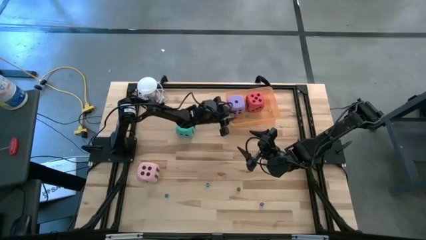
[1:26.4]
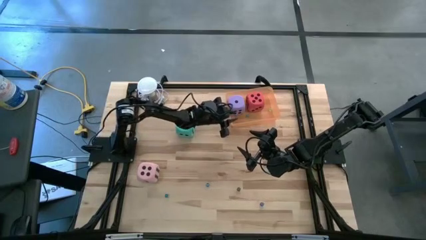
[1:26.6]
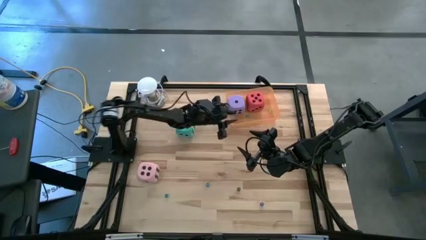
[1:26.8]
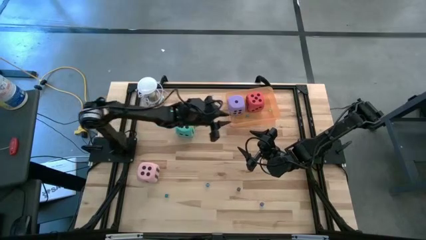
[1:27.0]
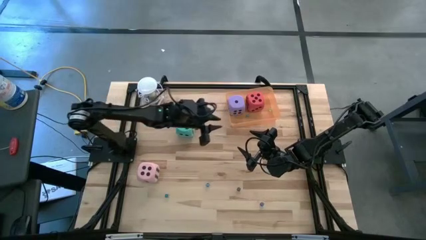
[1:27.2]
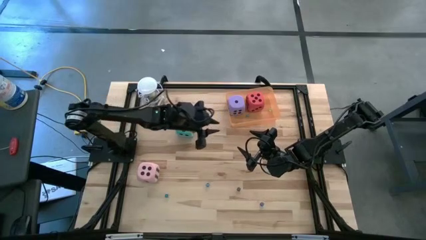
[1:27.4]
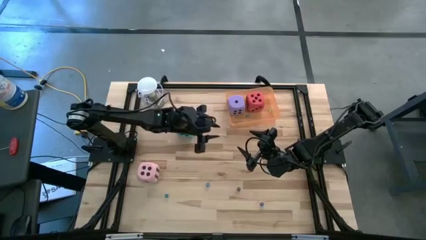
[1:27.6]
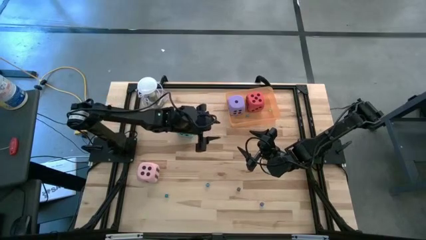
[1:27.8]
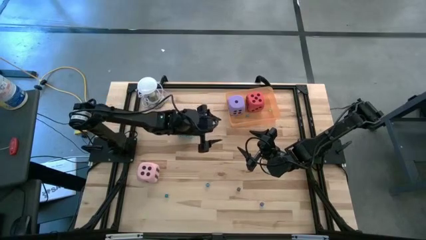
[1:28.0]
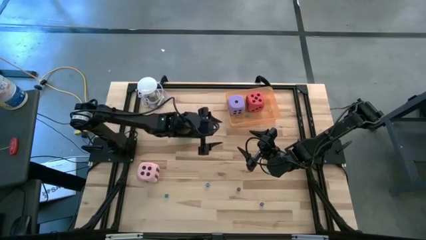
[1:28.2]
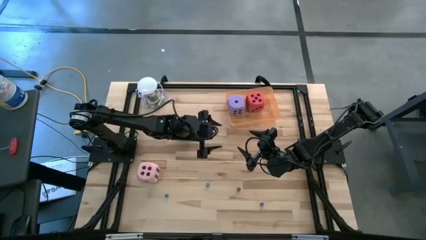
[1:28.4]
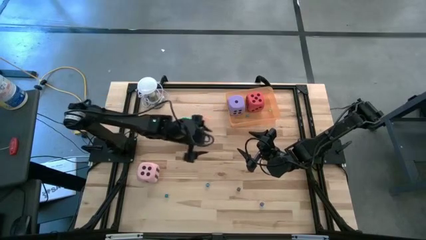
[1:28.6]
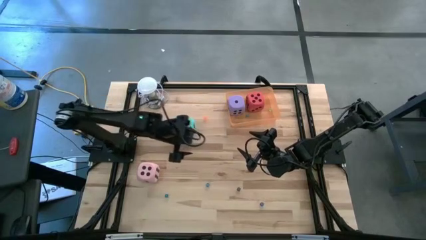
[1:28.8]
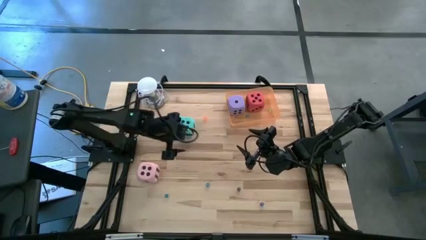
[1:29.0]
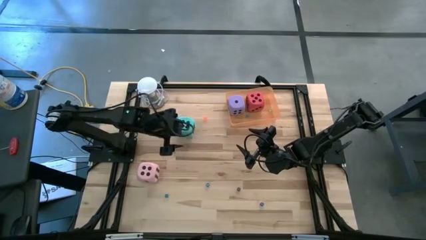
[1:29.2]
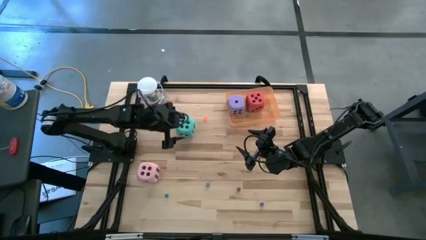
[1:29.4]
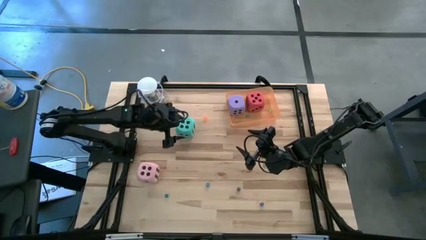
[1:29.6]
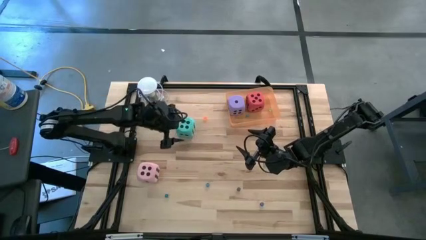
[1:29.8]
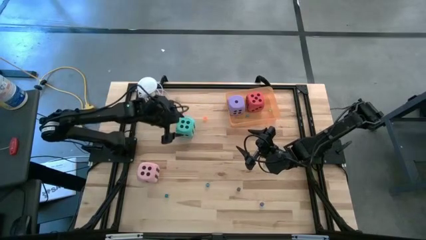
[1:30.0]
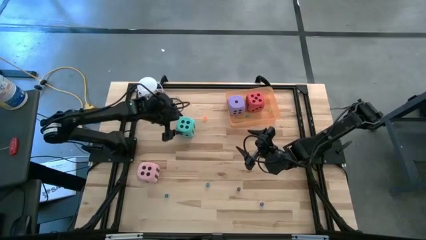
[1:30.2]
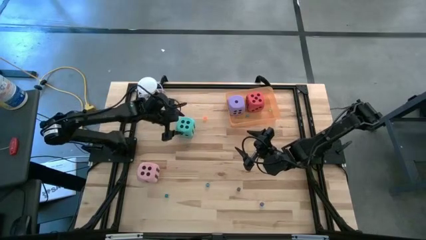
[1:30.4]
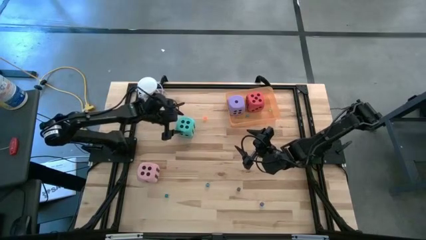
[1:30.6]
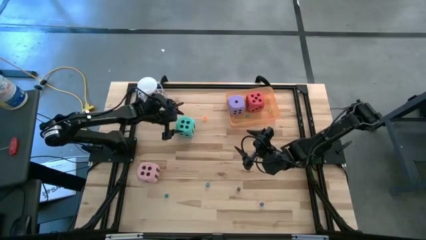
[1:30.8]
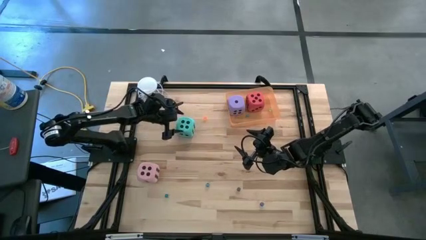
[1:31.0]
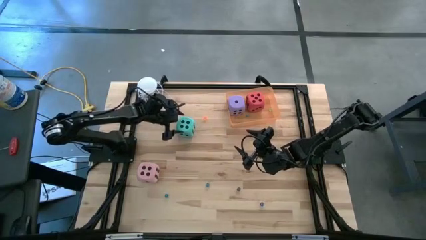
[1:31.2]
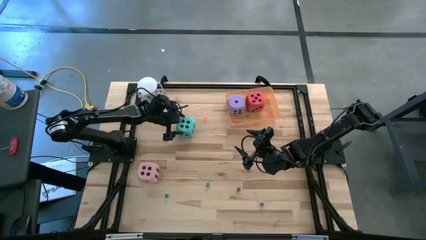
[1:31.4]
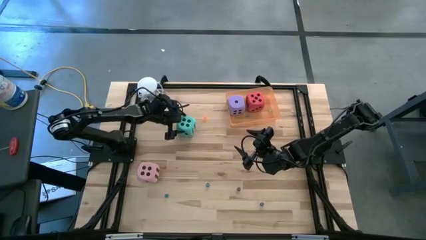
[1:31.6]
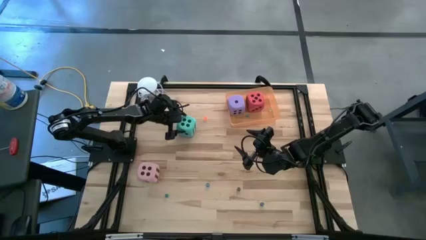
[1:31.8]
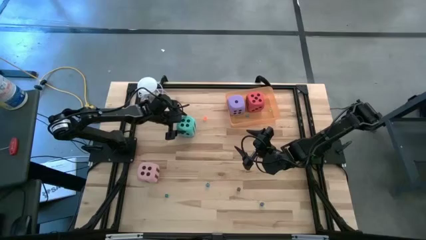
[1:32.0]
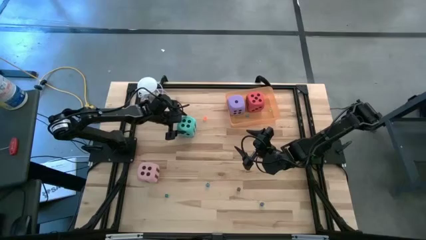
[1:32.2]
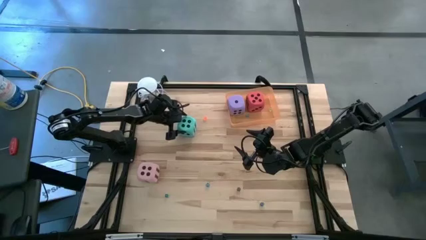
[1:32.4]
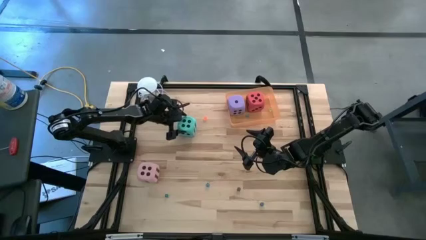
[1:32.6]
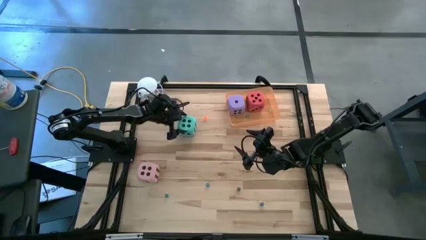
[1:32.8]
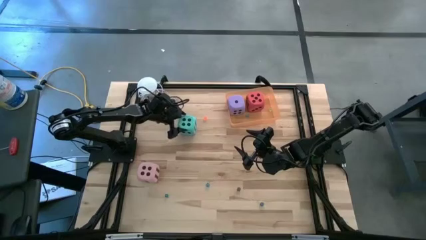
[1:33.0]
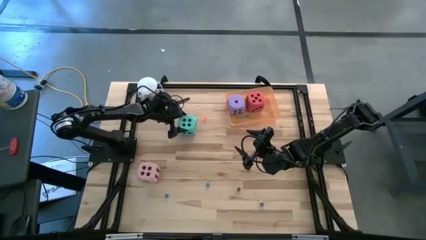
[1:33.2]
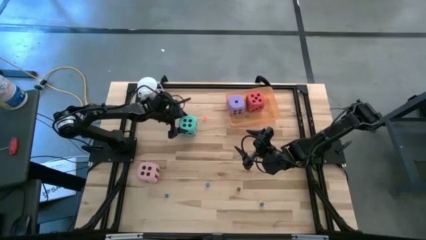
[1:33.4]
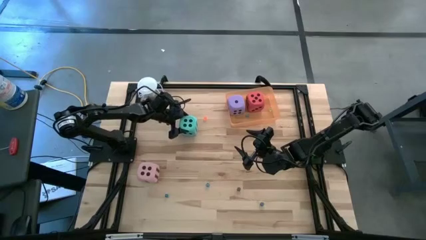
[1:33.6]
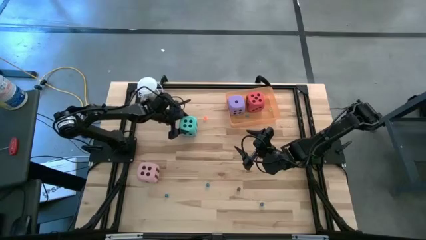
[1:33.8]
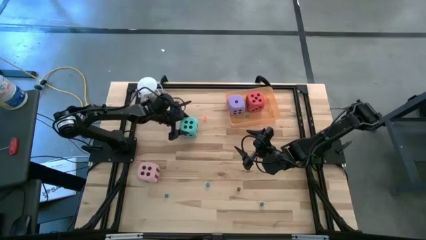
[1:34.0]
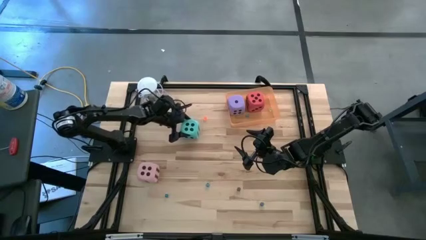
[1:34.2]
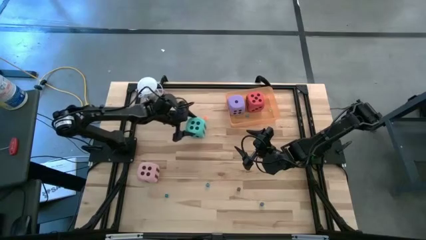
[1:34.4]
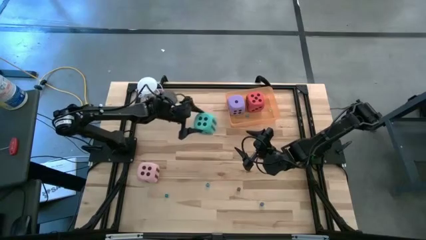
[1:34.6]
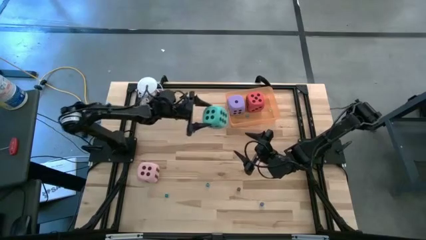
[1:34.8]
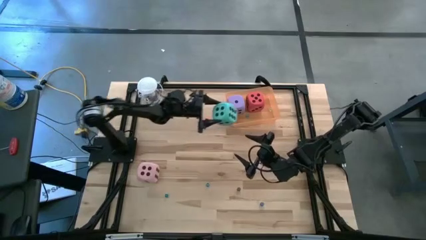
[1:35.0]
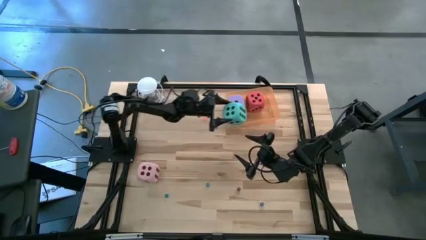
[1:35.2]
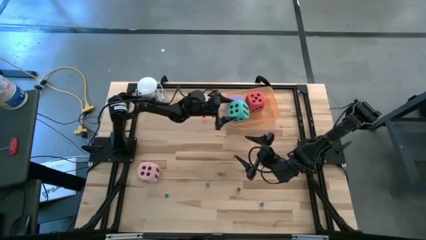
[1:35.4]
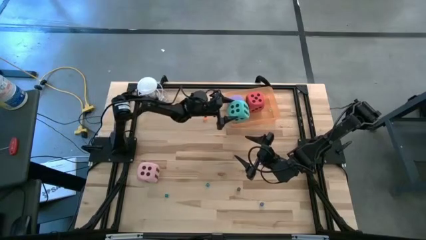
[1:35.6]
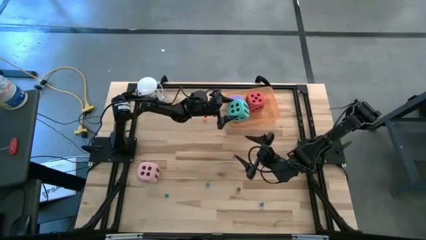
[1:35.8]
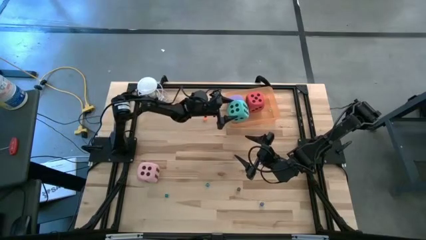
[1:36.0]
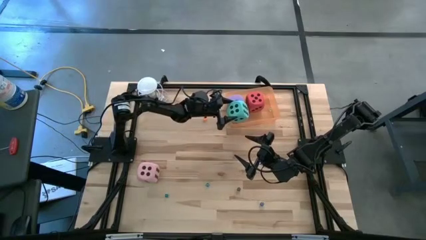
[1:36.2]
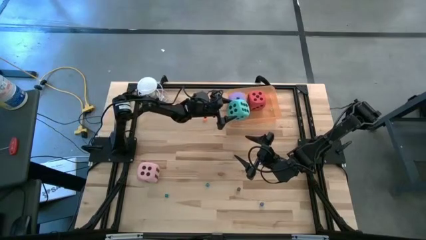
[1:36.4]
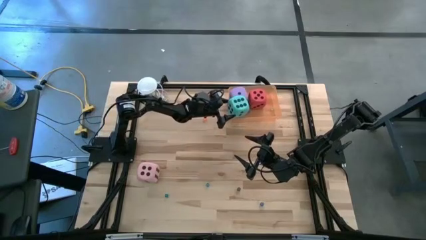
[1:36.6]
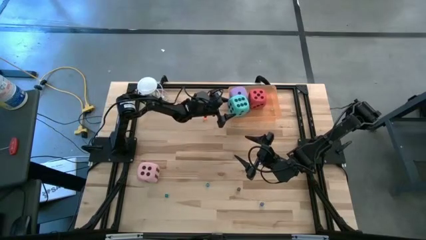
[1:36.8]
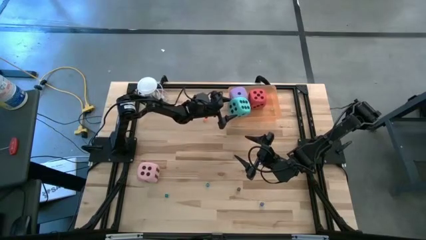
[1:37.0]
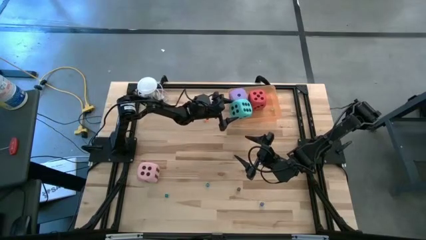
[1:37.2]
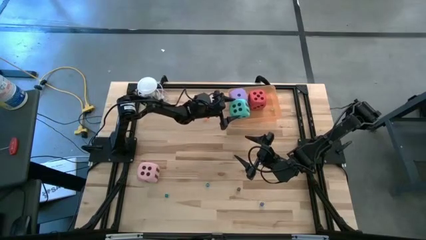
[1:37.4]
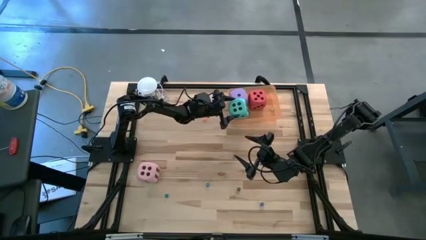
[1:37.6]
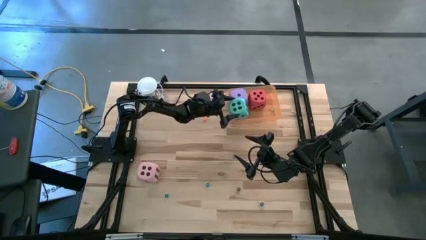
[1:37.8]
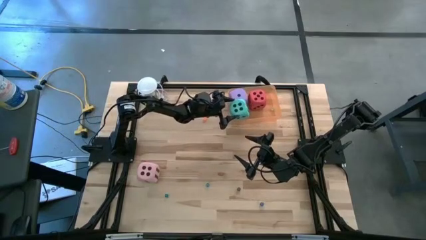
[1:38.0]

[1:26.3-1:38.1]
Task: Pick & Place Dice
Put the large light blue die into the the orange bin

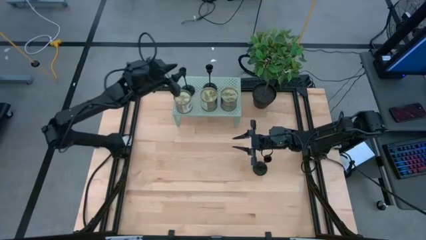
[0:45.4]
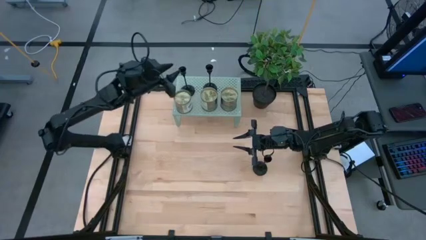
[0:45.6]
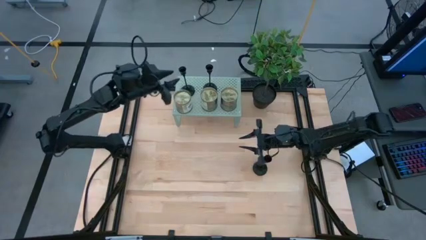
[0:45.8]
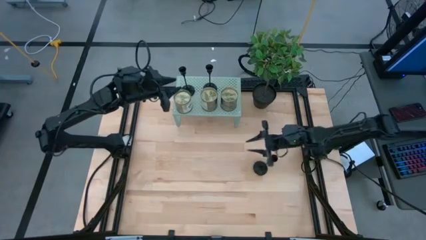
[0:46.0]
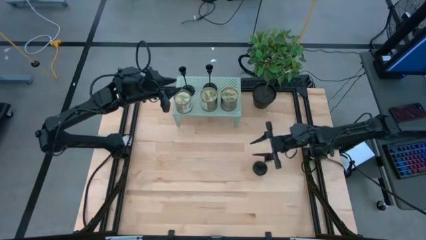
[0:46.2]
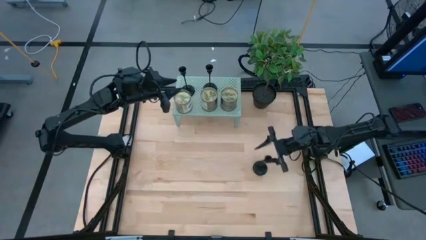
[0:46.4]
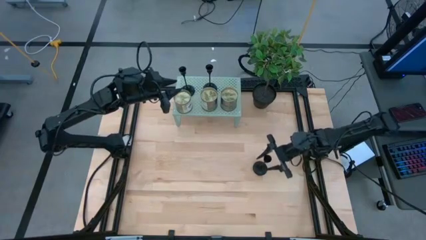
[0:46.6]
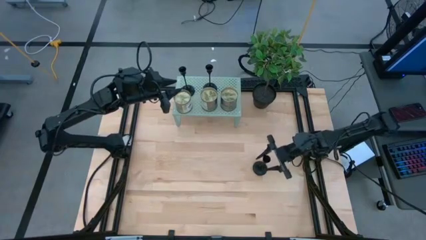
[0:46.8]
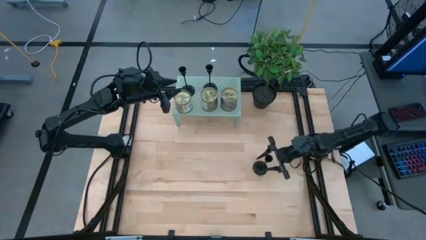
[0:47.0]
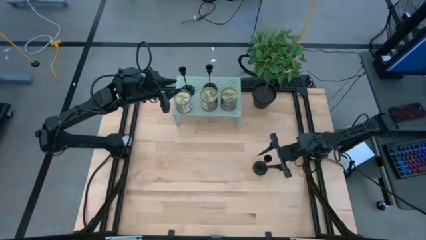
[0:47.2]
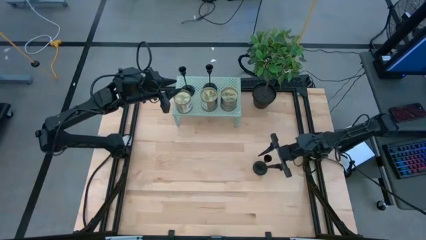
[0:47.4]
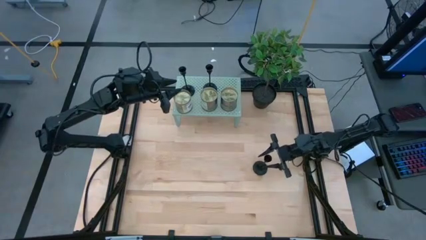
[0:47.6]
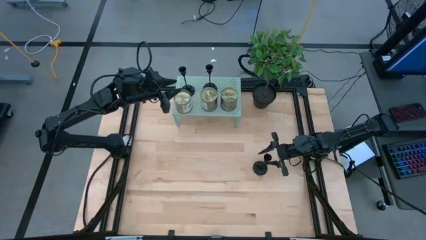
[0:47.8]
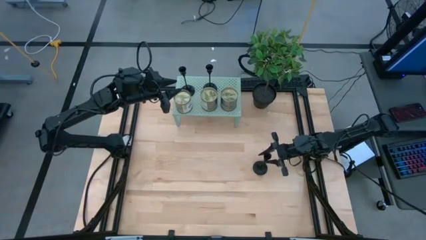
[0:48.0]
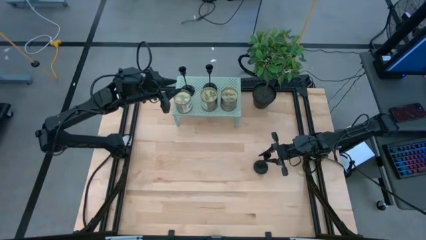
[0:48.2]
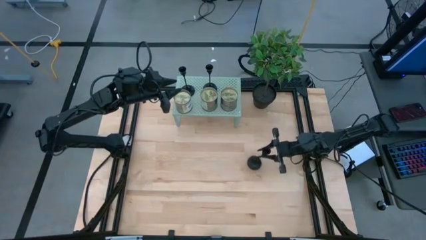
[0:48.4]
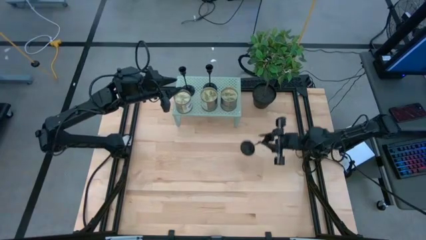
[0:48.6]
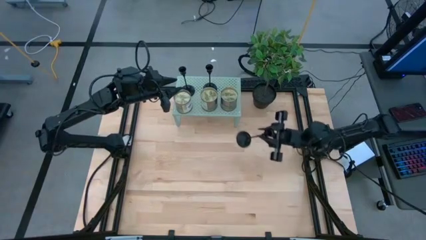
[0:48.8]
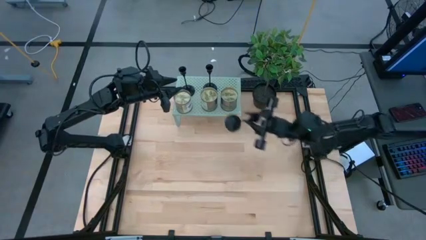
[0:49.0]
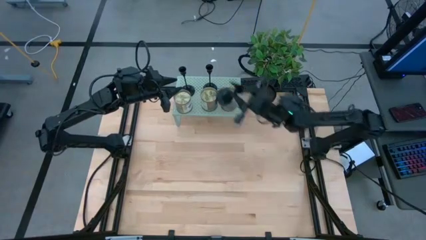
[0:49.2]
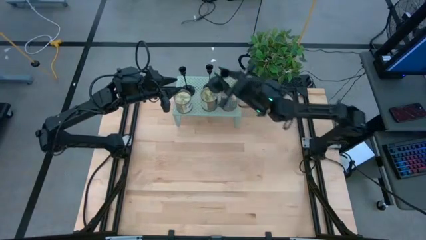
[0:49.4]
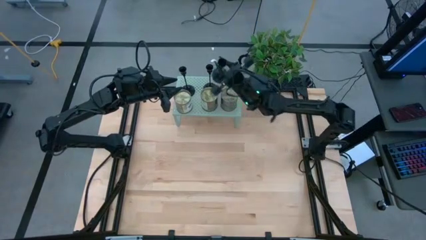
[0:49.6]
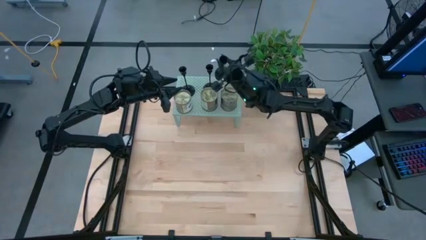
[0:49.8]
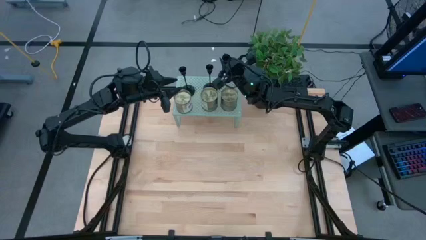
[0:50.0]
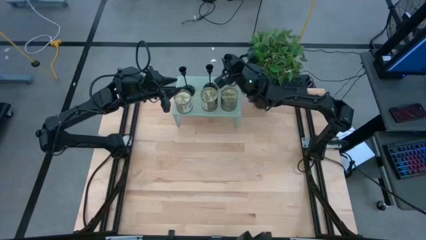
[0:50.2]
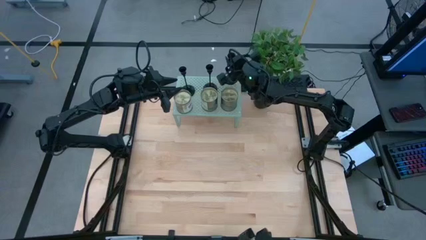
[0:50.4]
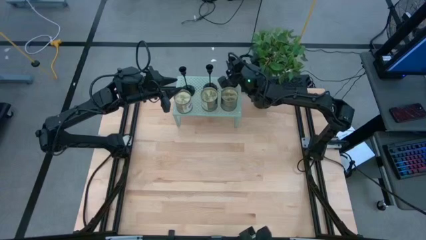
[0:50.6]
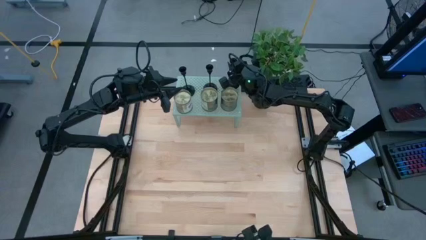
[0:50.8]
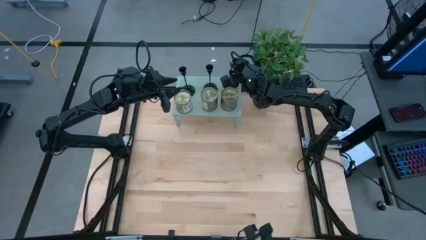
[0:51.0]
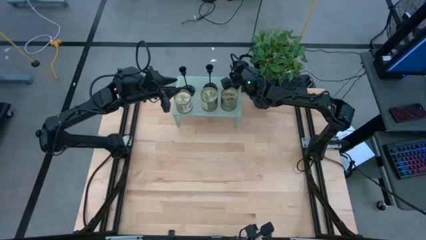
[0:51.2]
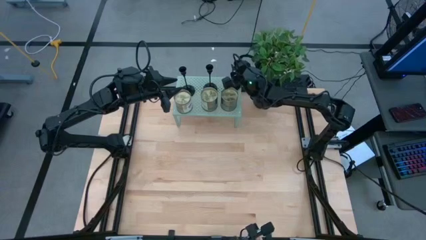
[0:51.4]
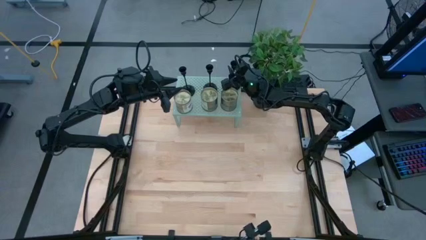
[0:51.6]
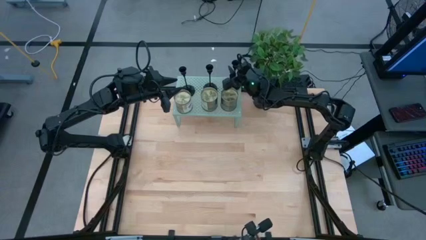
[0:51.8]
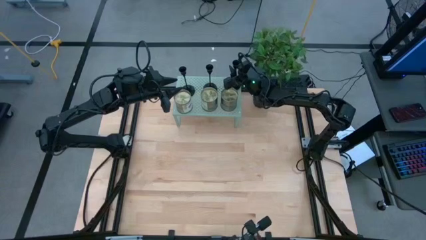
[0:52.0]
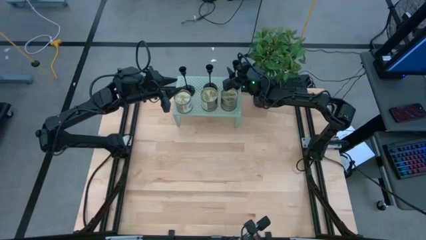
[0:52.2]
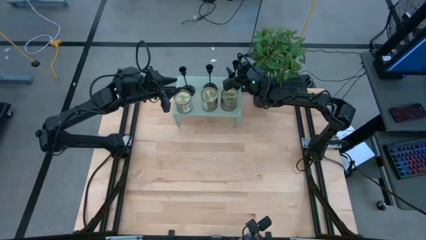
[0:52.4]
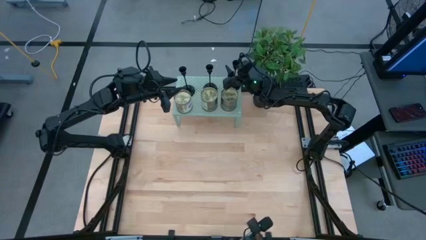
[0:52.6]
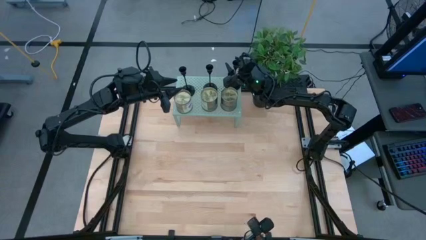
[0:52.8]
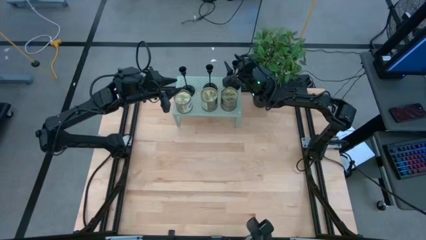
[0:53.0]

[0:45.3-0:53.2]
Task: Pick & Place candle stick holders
Put the black candle holder on the shelf
